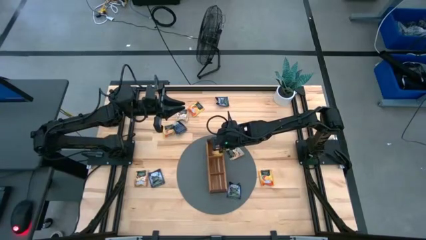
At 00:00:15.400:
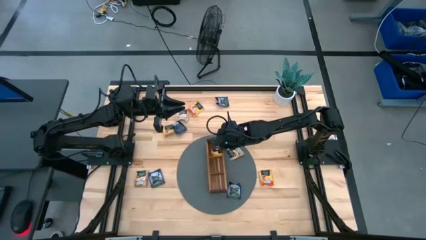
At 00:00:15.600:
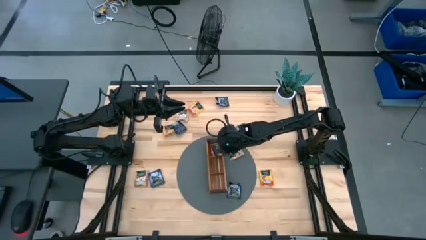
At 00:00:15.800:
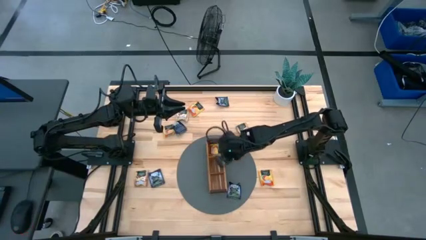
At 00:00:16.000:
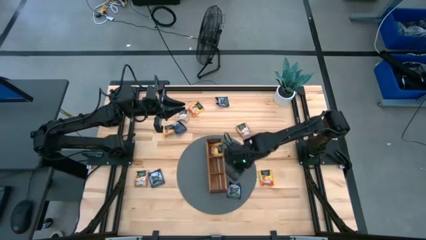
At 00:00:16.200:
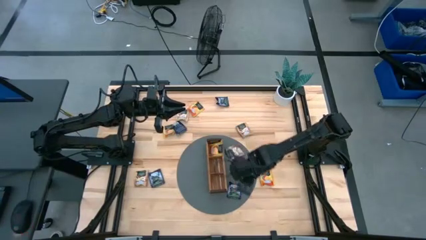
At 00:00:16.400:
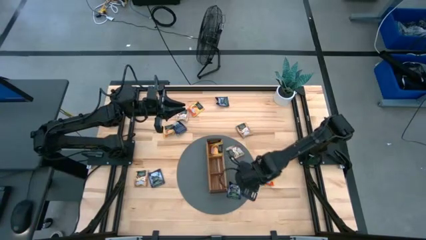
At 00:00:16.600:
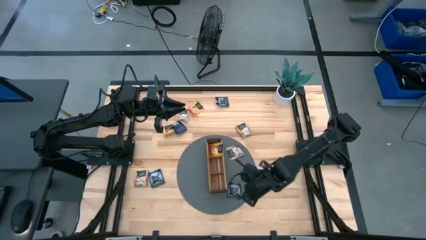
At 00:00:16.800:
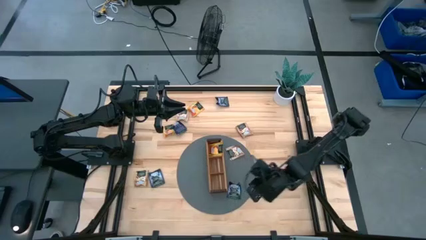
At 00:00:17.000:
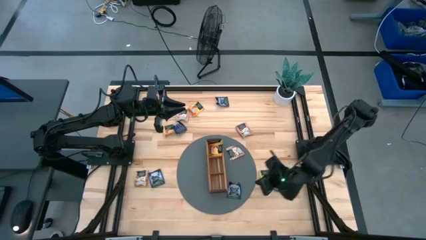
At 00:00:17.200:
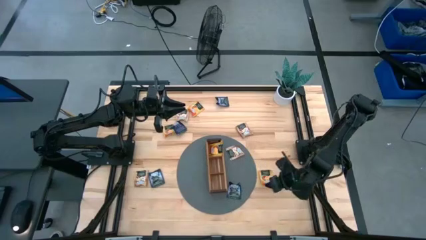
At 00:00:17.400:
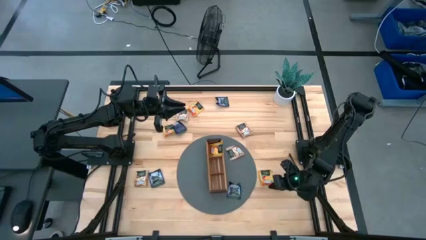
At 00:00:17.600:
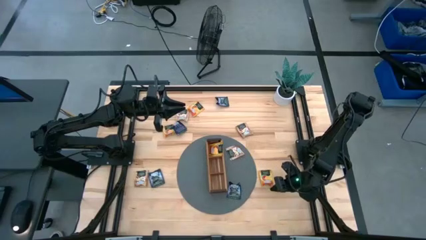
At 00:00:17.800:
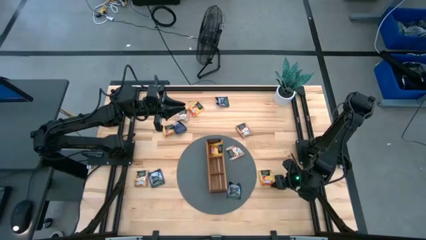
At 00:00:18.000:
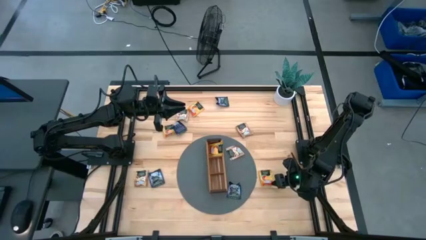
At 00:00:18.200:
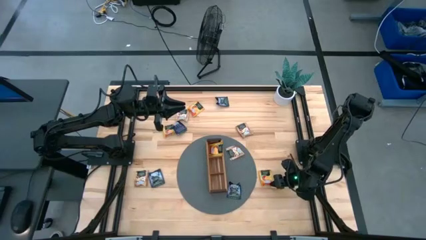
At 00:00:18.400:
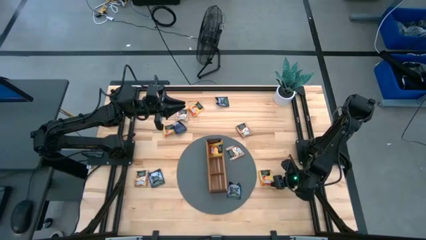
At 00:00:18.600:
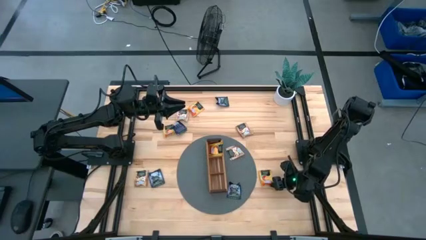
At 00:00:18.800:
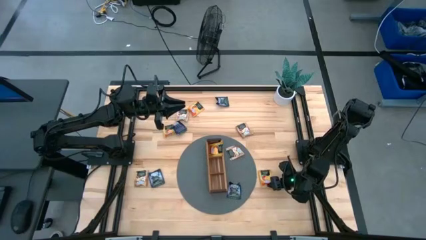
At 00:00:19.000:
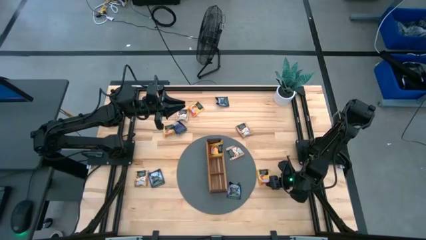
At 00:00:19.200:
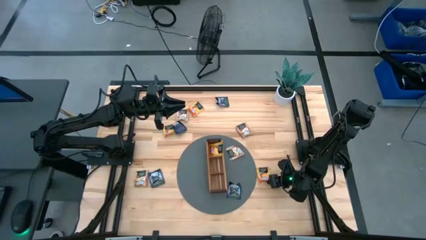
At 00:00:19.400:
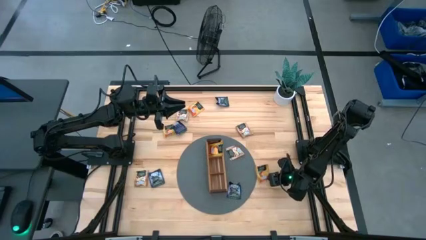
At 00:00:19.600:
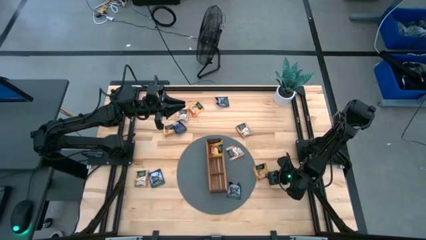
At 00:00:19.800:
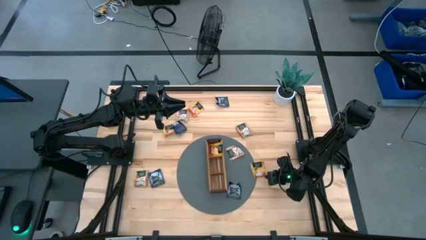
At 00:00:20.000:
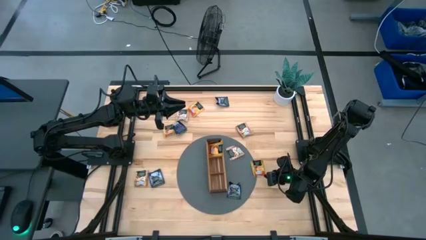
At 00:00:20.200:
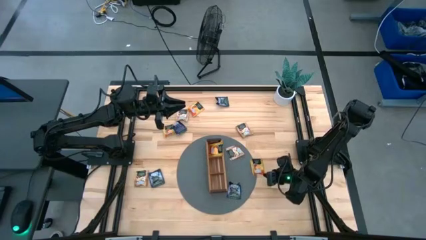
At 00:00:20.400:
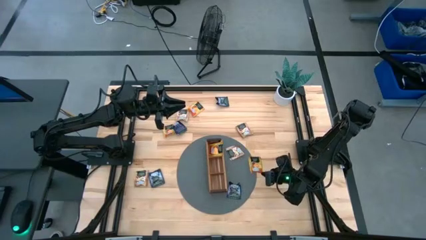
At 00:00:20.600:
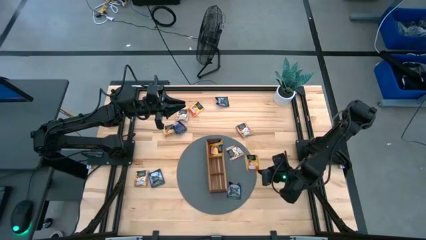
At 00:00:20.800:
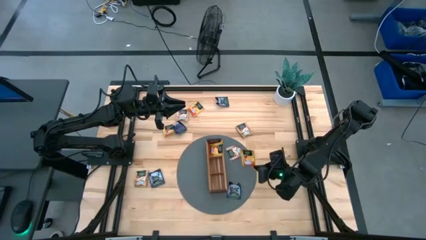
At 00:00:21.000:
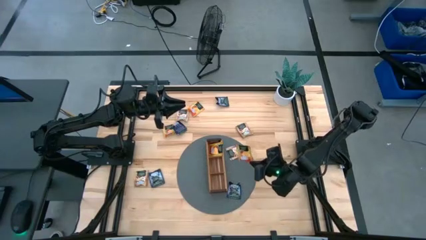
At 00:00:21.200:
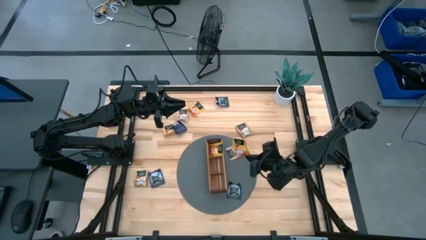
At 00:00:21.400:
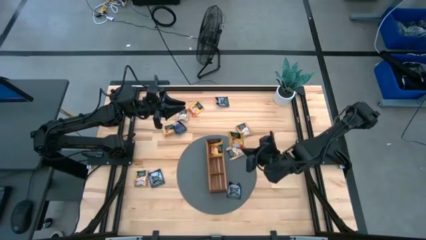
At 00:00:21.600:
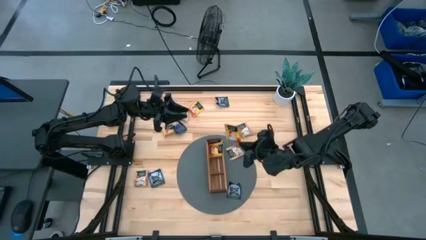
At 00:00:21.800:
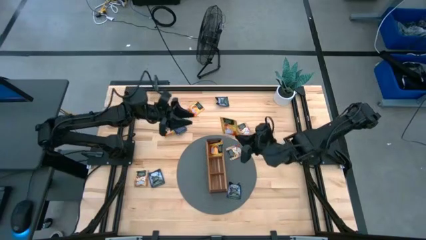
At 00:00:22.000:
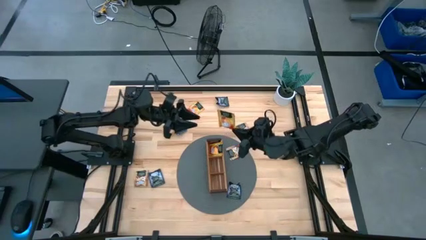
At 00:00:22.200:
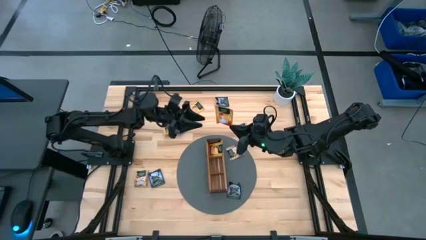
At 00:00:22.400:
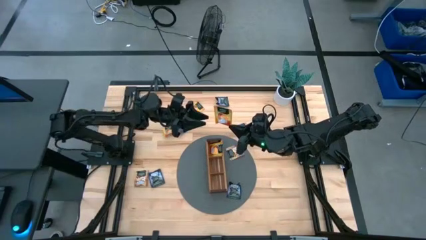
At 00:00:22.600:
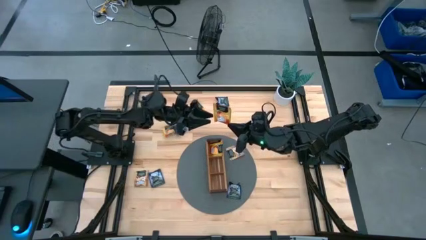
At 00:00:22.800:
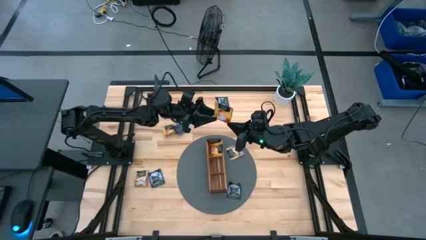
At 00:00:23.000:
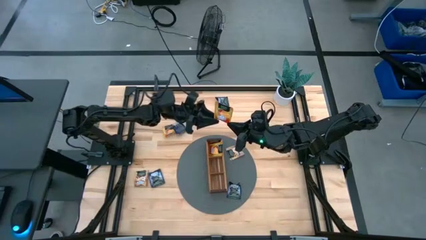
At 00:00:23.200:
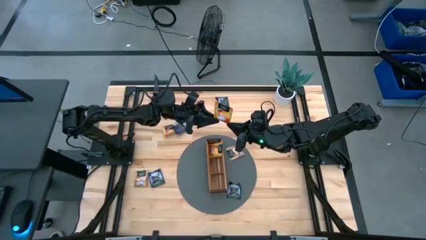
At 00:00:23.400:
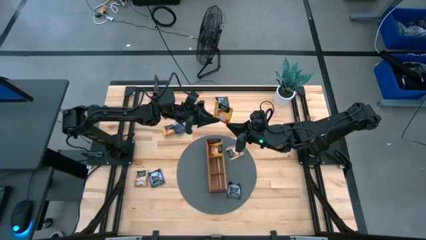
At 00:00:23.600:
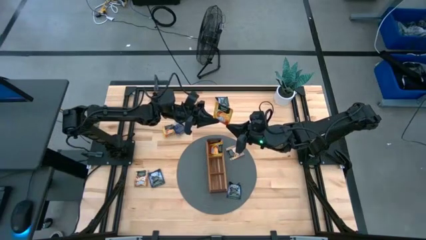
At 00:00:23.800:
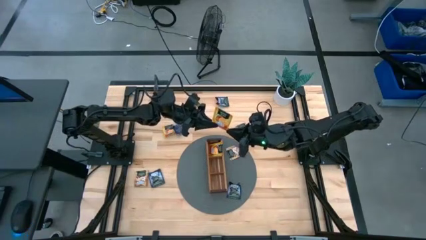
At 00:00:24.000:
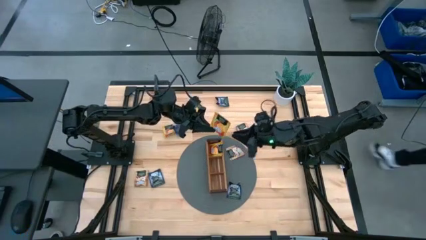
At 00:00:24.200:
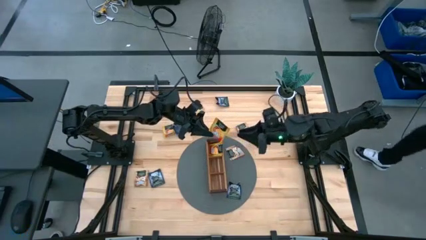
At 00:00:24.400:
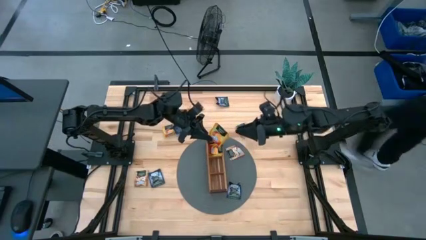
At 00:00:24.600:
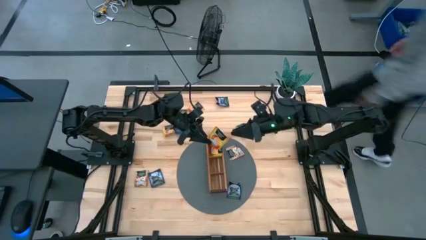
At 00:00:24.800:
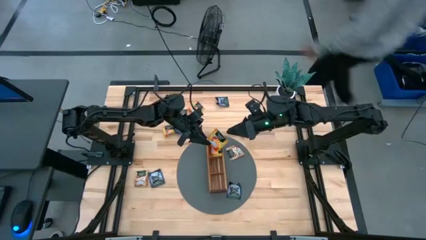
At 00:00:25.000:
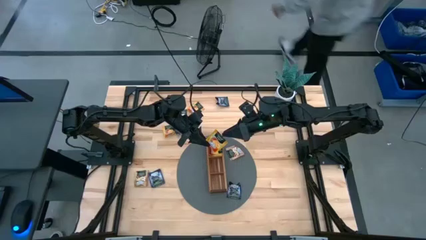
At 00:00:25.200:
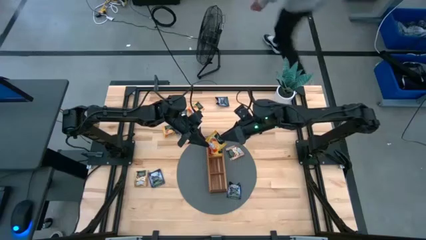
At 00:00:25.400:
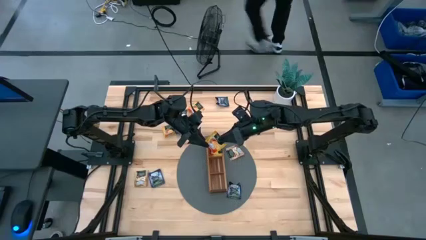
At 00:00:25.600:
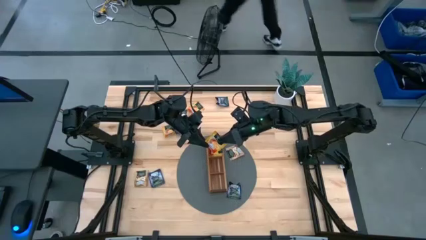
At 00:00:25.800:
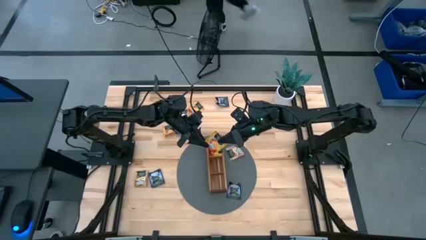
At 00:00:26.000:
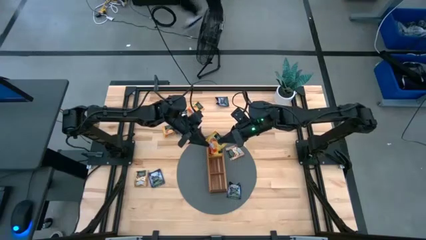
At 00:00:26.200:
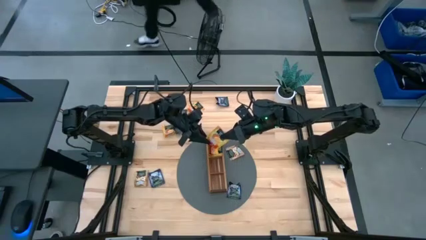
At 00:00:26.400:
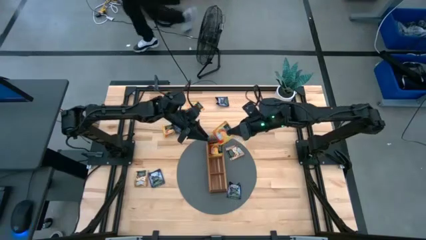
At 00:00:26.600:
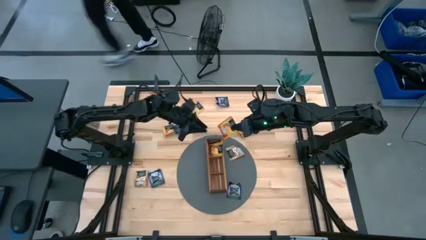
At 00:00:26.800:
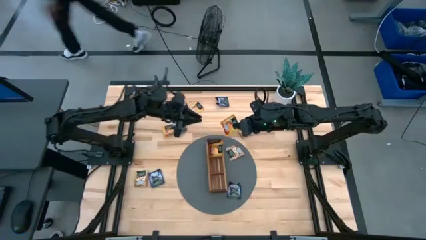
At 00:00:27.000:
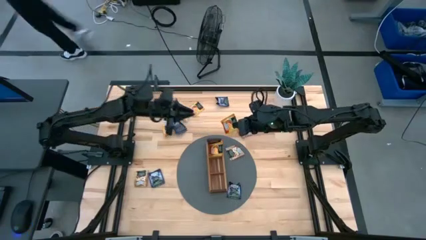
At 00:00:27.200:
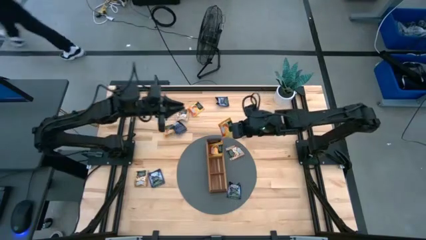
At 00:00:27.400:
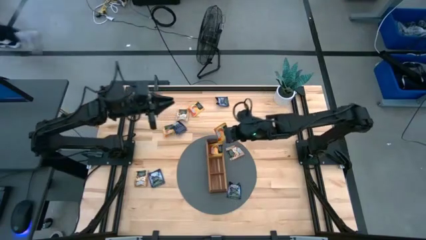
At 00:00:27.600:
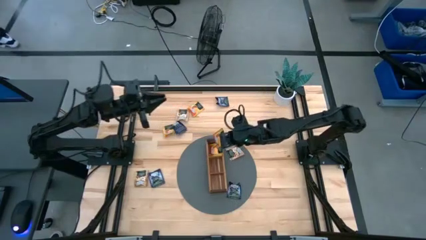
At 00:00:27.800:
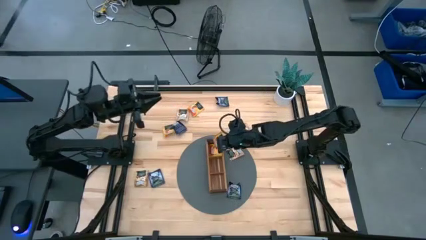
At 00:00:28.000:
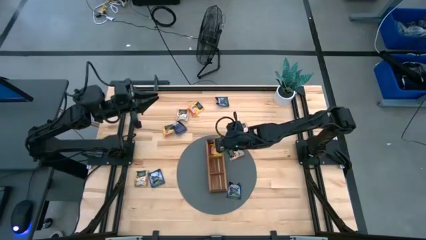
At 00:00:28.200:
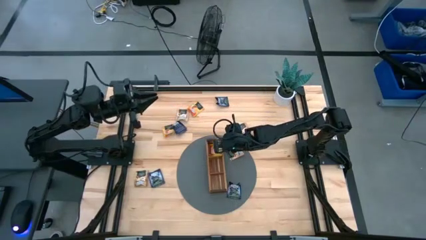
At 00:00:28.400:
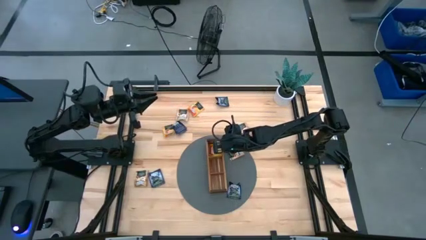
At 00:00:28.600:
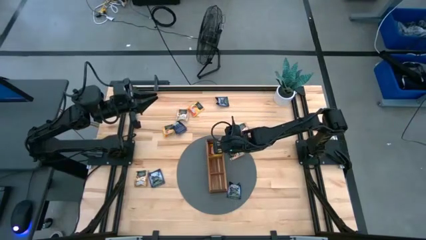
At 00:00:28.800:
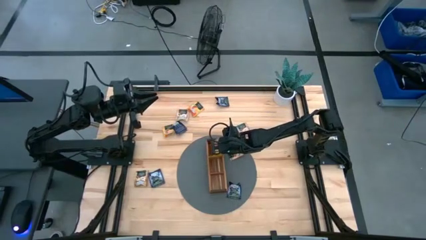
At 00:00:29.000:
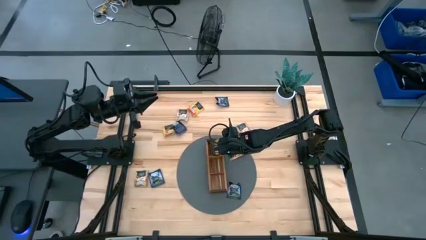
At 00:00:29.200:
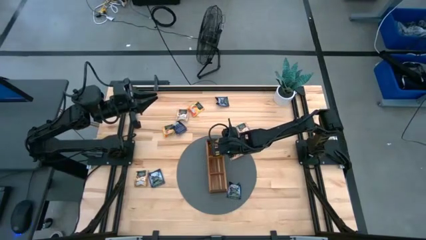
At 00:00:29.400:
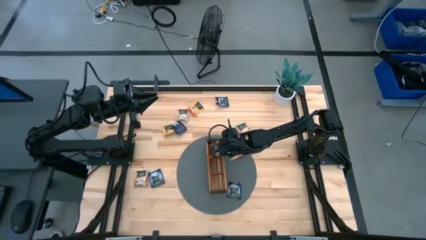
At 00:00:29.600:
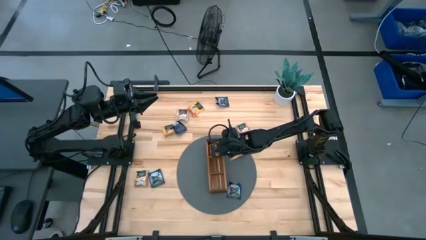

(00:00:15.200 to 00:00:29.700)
Task: Pick & Place Tea
Put the orange tea bag into the top section of the wooden organizer
